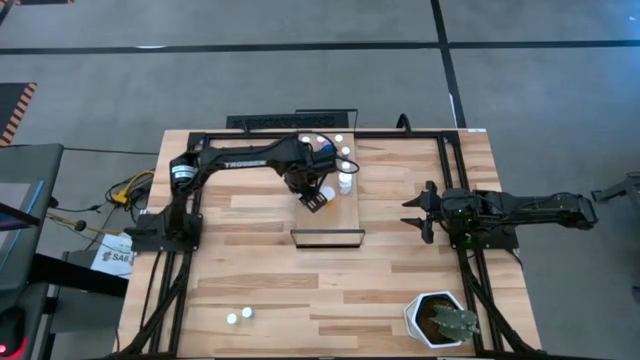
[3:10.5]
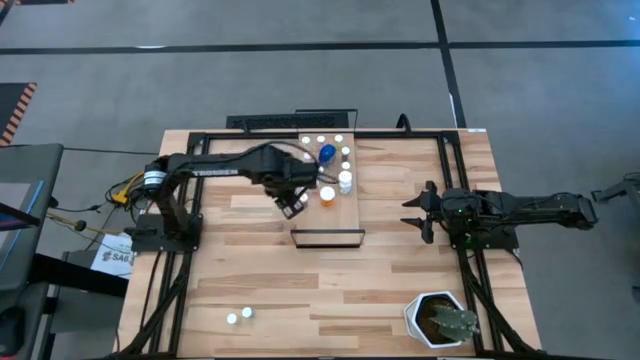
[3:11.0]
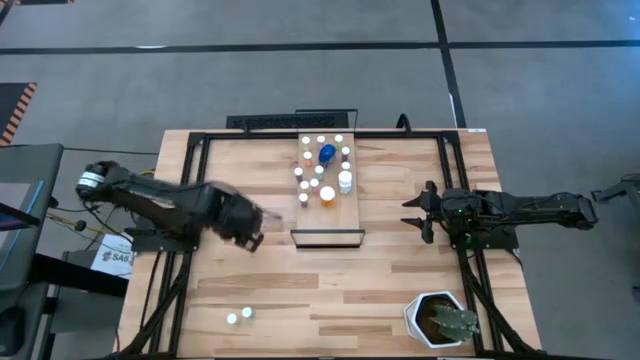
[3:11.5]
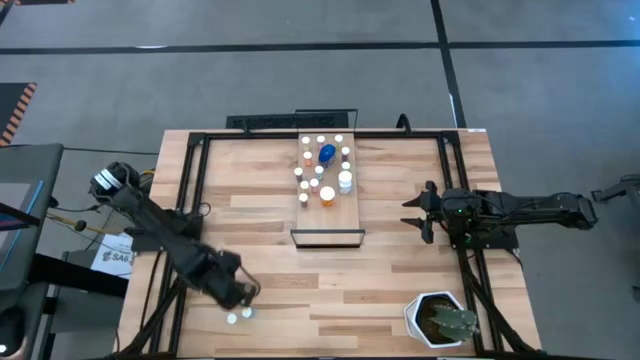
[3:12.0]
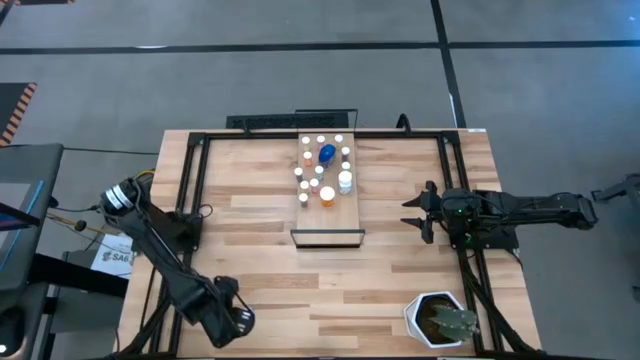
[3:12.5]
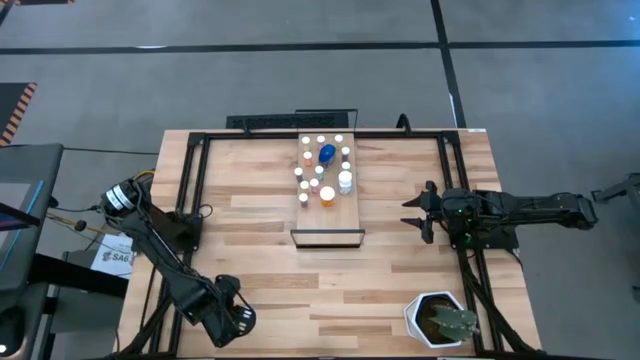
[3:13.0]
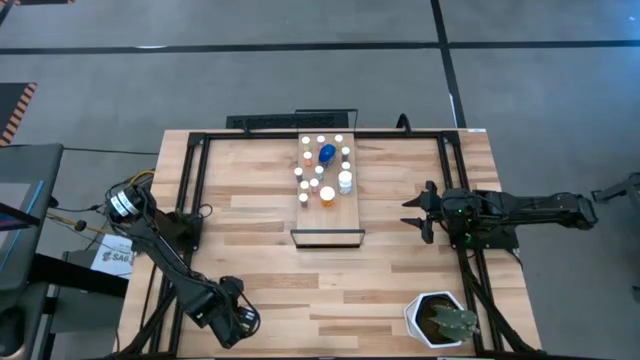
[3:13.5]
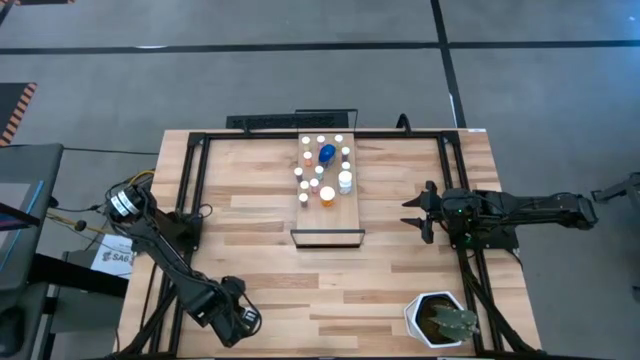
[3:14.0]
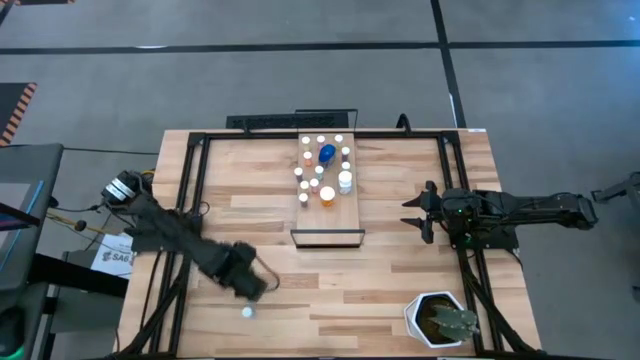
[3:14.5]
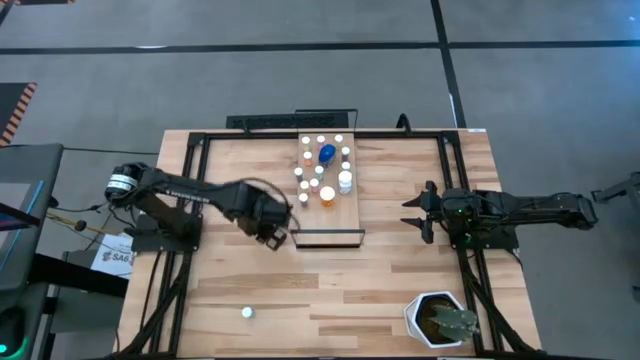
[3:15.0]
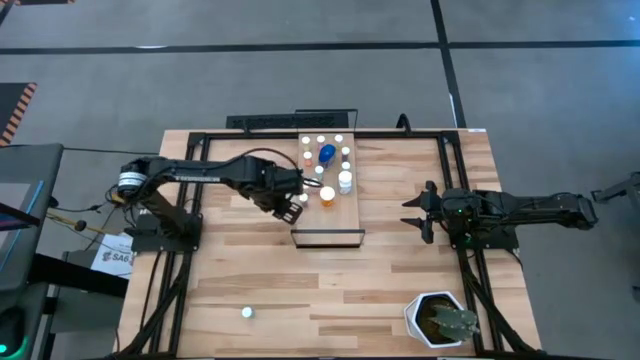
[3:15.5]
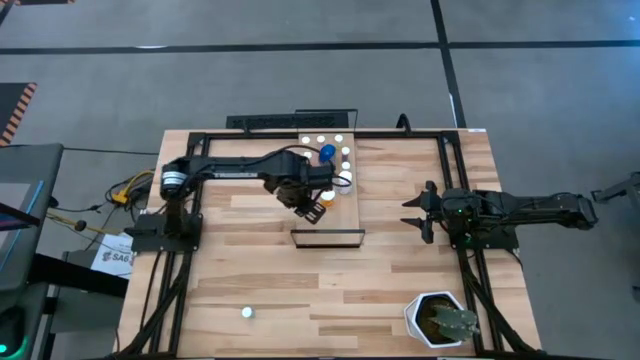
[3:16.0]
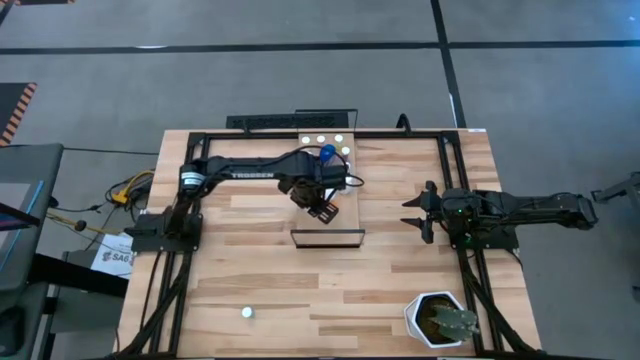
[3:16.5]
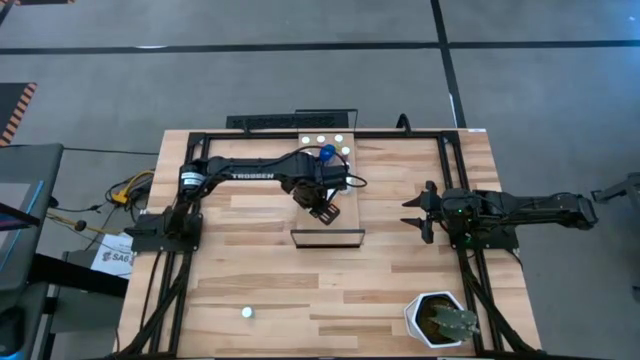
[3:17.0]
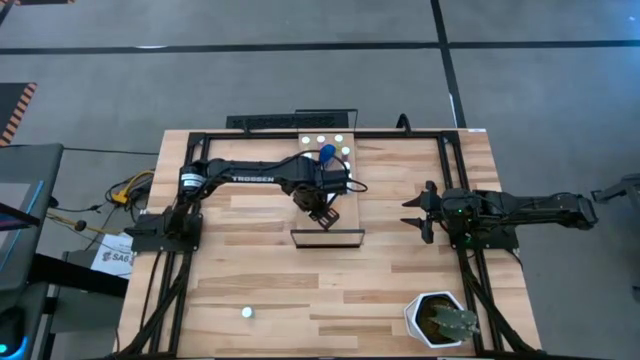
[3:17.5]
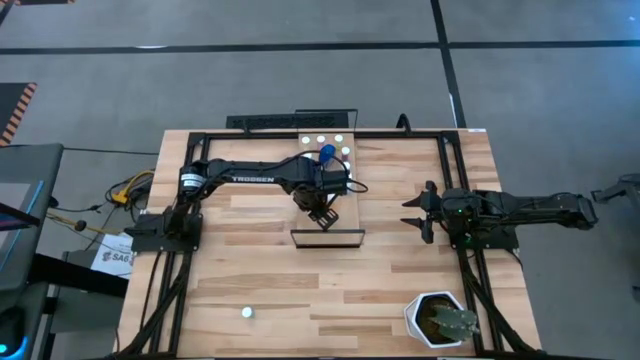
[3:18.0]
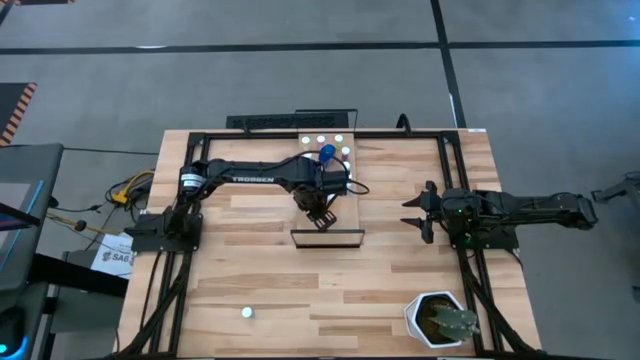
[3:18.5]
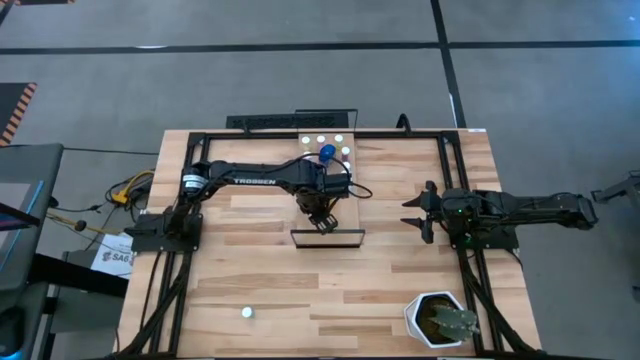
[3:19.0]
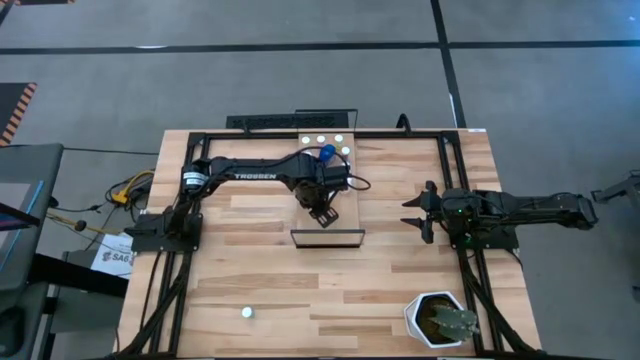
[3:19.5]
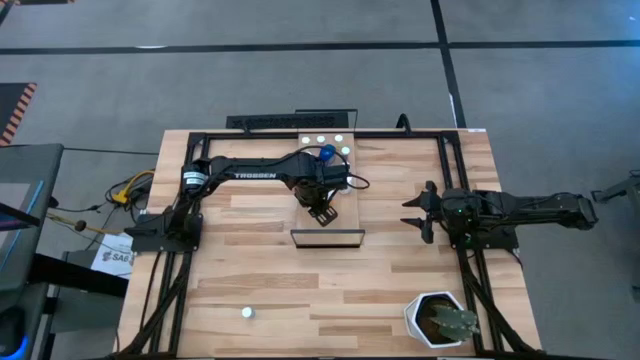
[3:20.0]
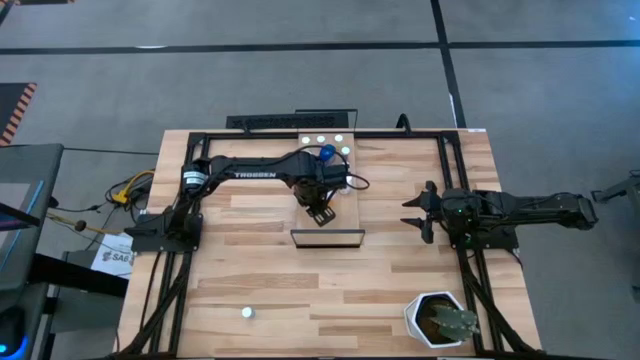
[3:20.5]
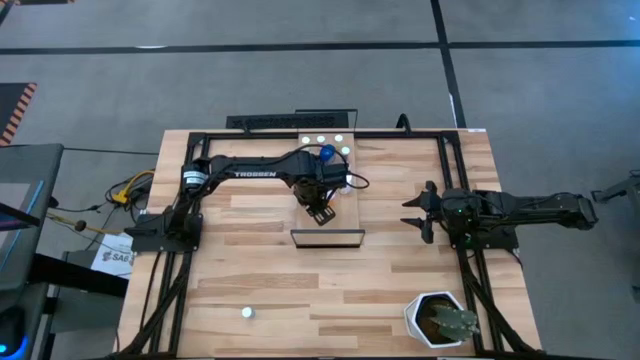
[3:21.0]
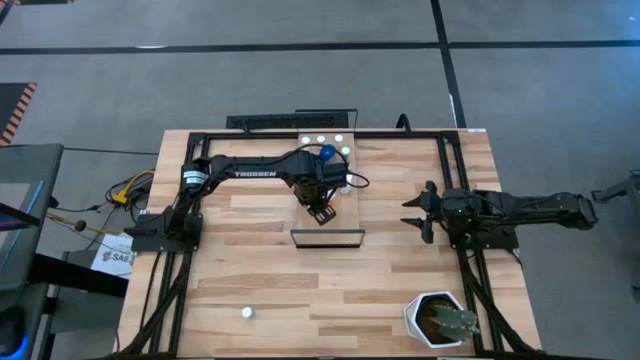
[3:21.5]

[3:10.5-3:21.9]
Task: Pick and place medicine bottles onto shelf by color
Put the yellow pill bottle on the shelf

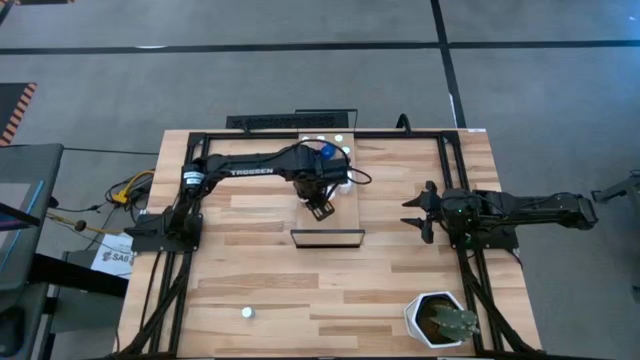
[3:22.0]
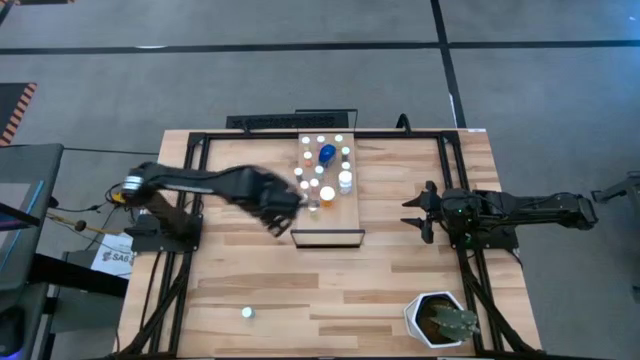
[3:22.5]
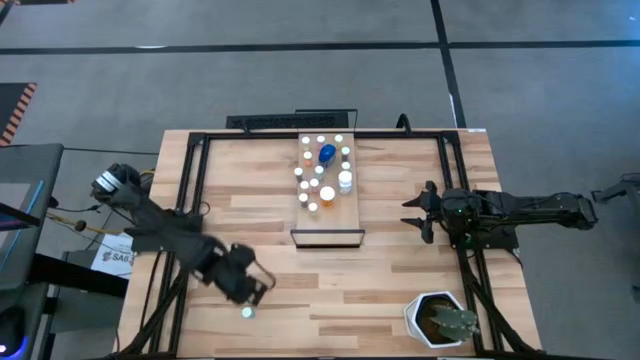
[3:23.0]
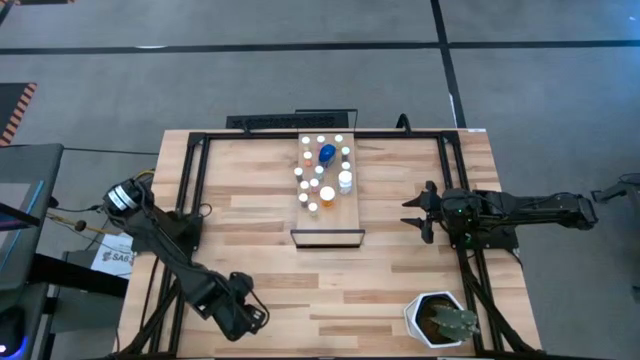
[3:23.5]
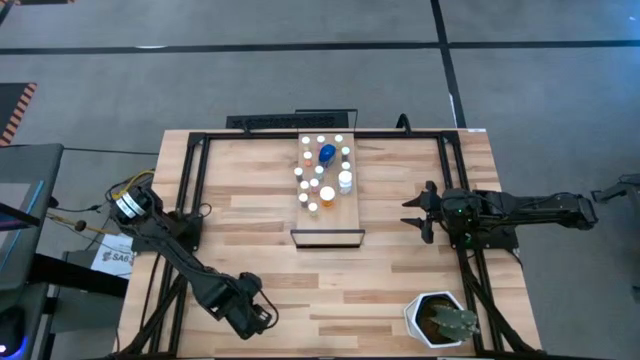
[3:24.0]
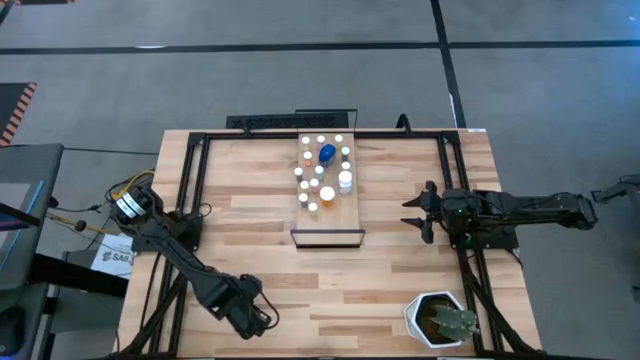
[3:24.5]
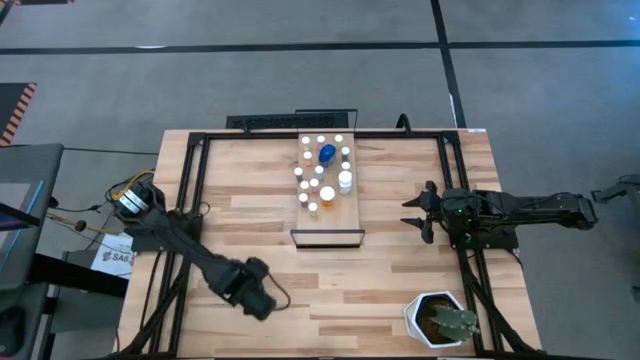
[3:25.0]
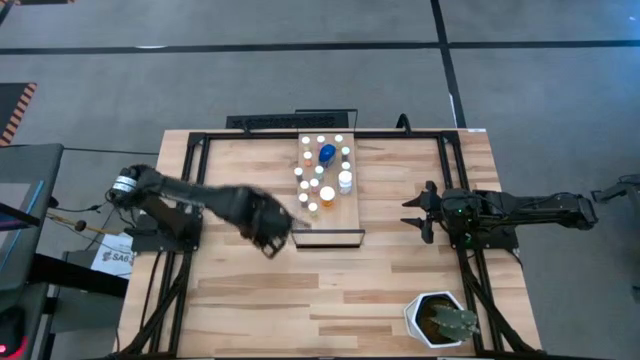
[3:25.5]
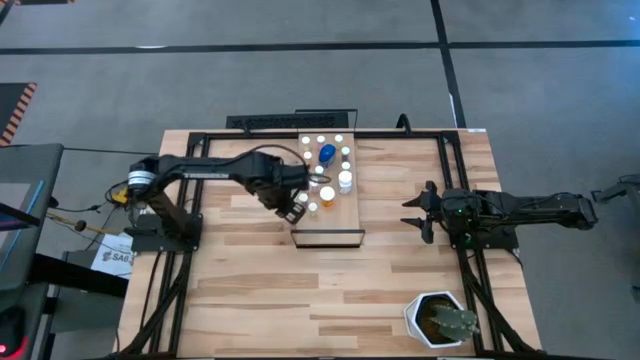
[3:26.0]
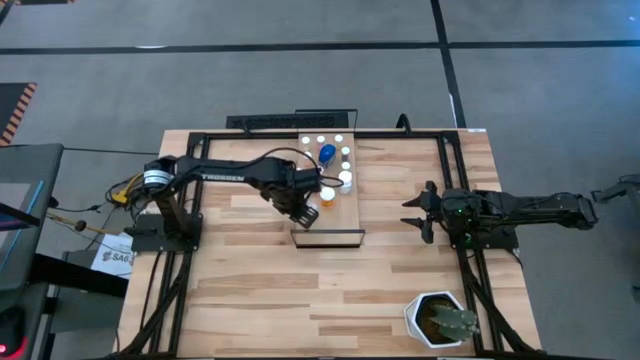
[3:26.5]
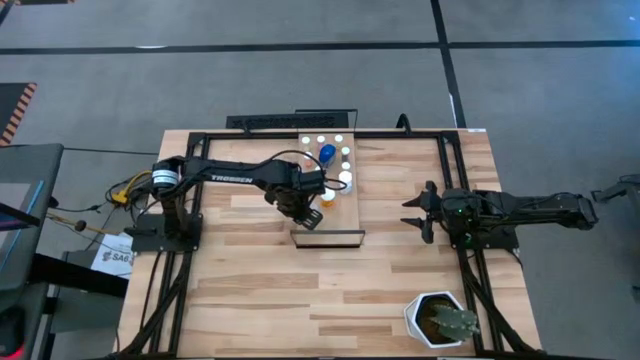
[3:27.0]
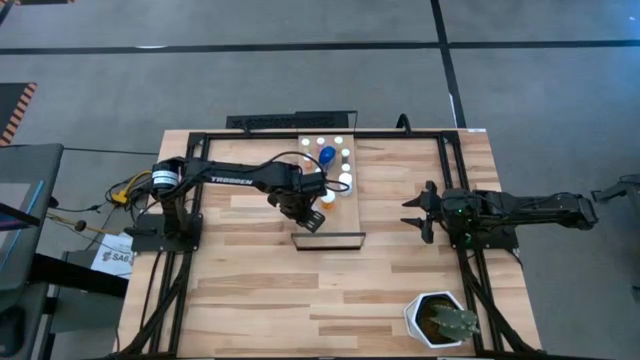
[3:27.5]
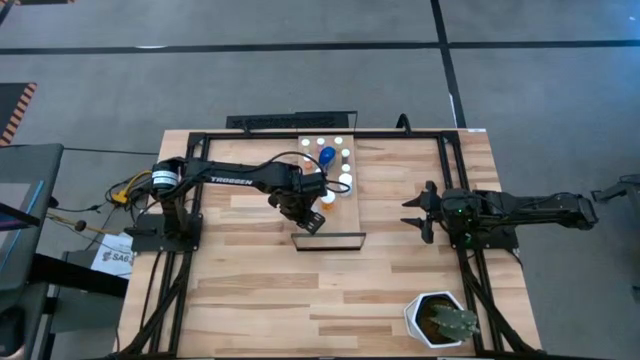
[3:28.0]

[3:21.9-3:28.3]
Put the blue pill bottle on the shelf

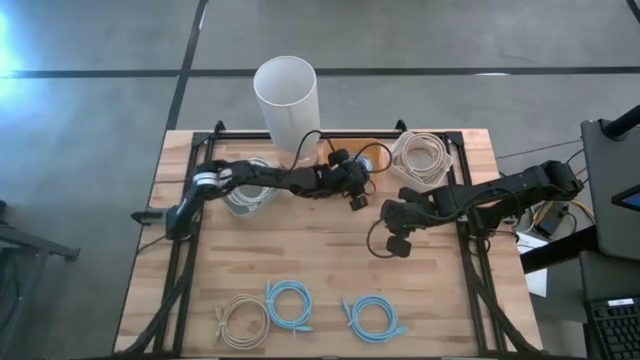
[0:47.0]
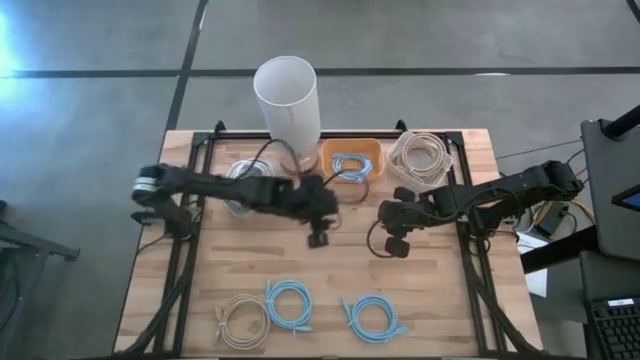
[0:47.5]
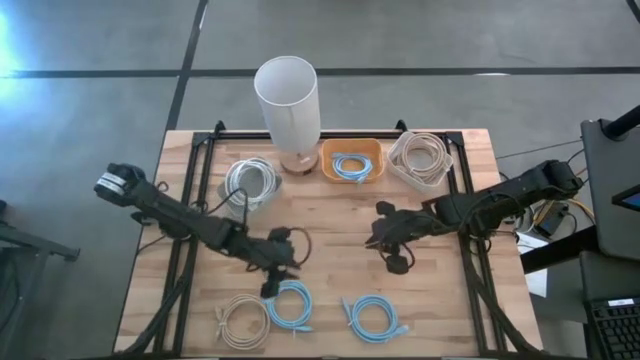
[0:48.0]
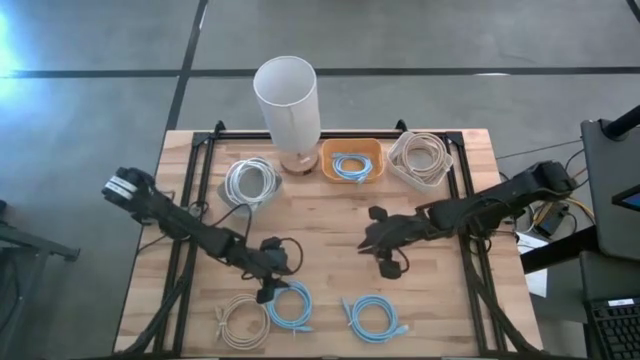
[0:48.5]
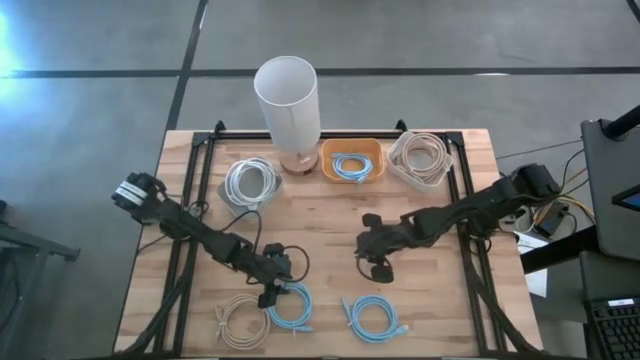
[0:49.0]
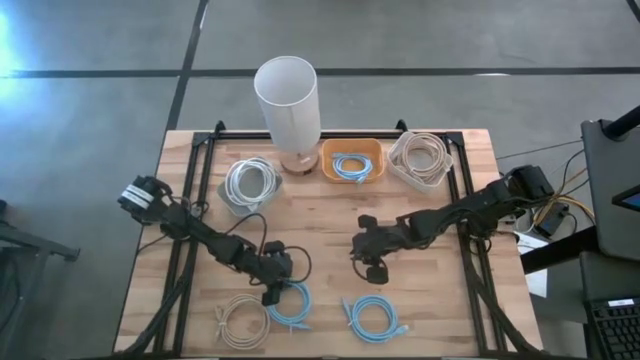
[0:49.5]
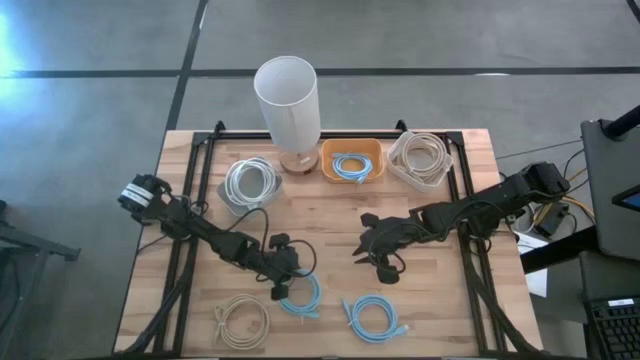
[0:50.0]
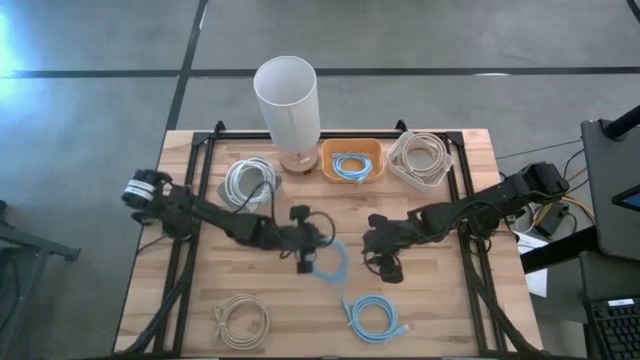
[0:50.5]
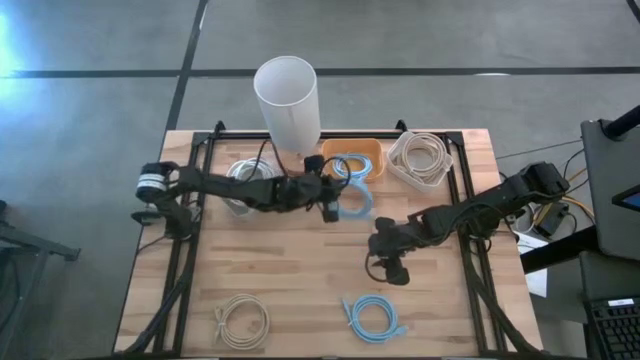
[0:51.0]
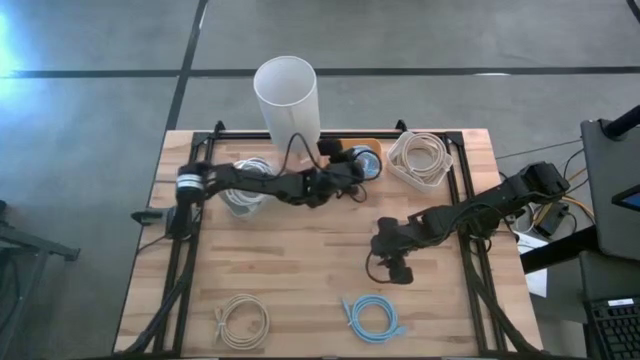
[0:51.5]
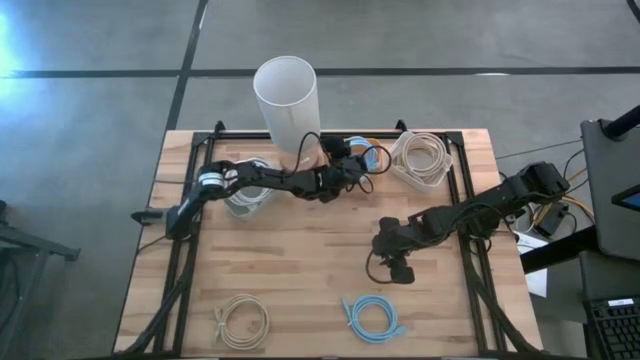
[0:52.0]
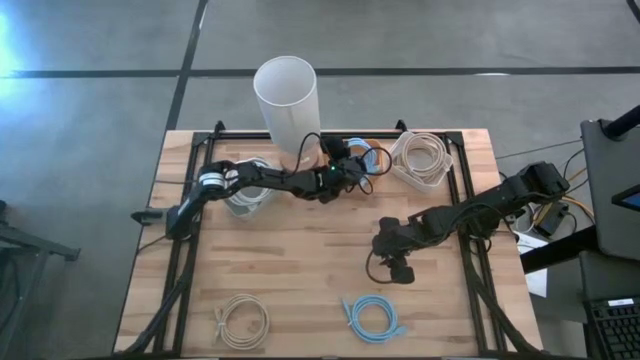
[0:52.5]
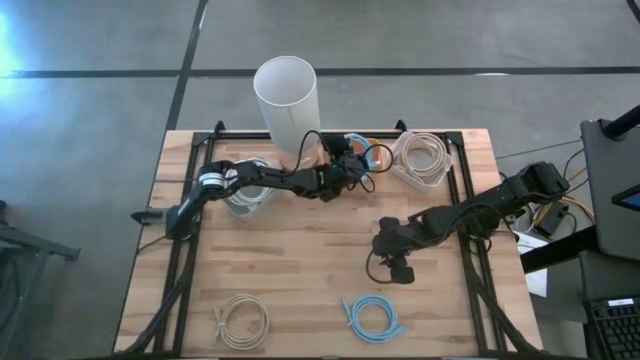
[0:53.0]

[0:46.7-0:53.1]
Task: Sort HDMI cables
Put the left blue HDMI into the yellow bin
